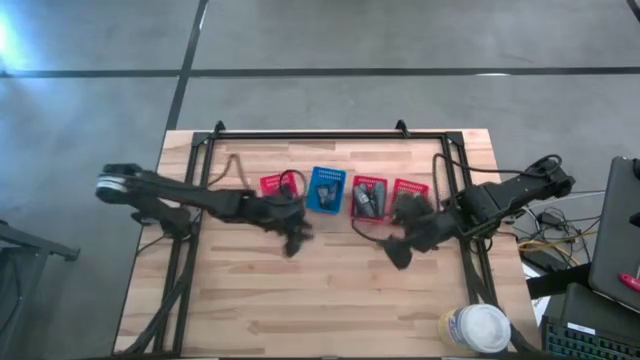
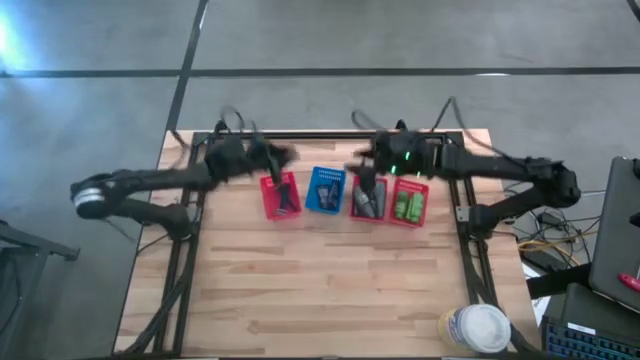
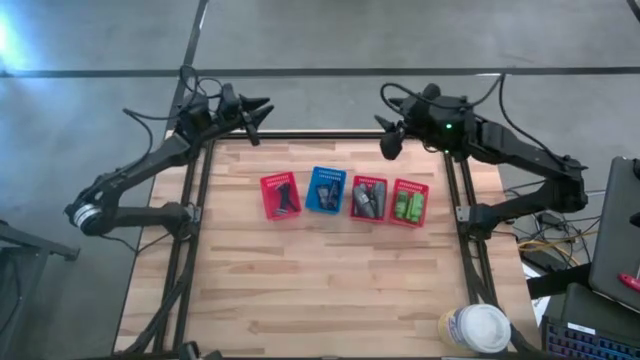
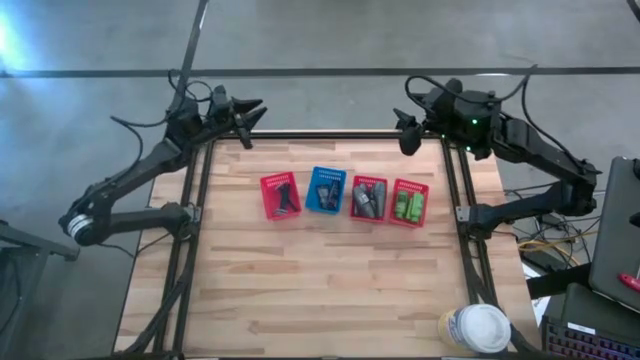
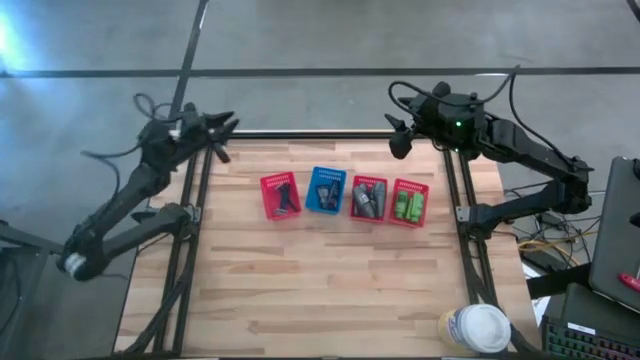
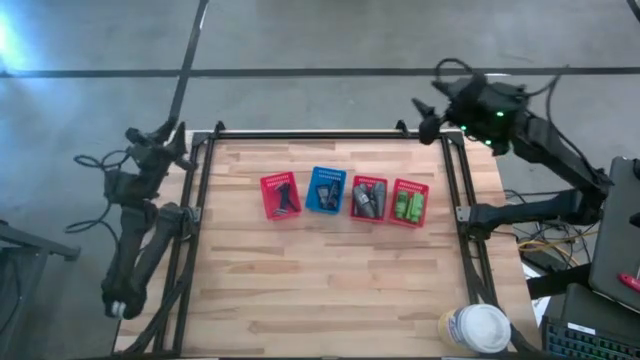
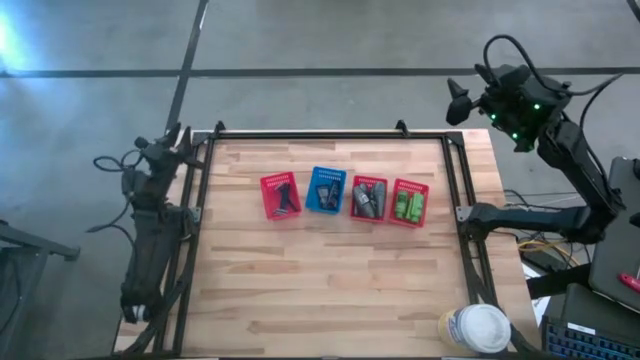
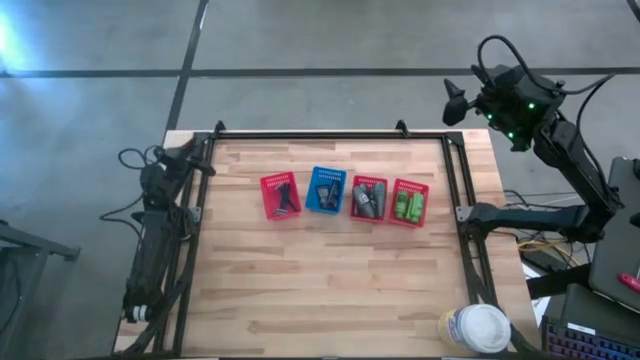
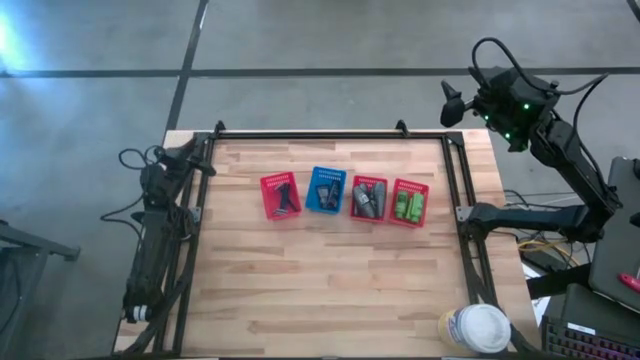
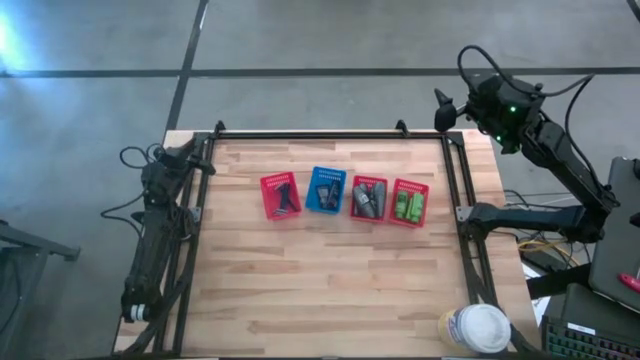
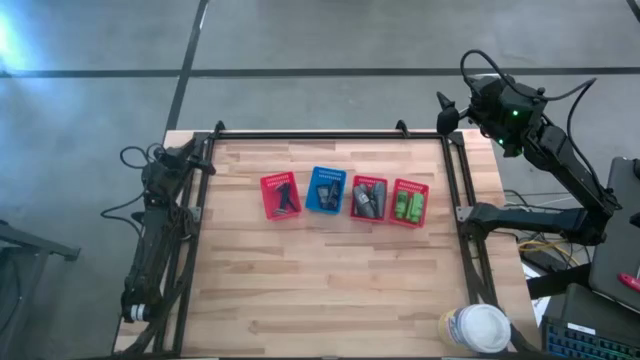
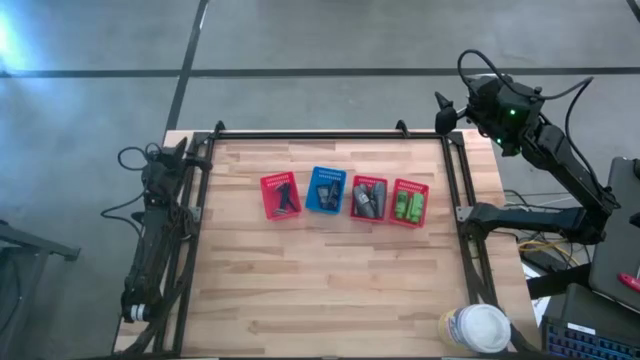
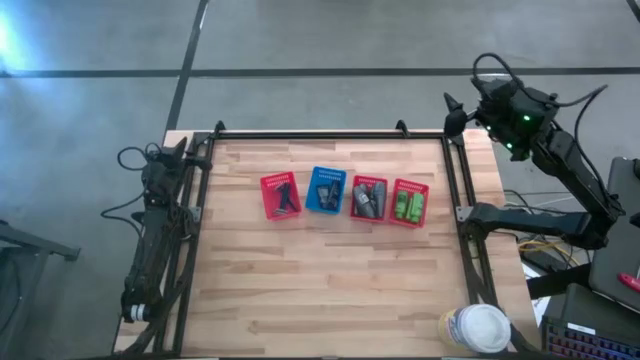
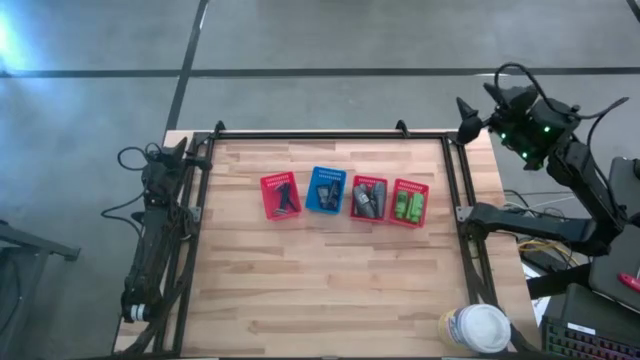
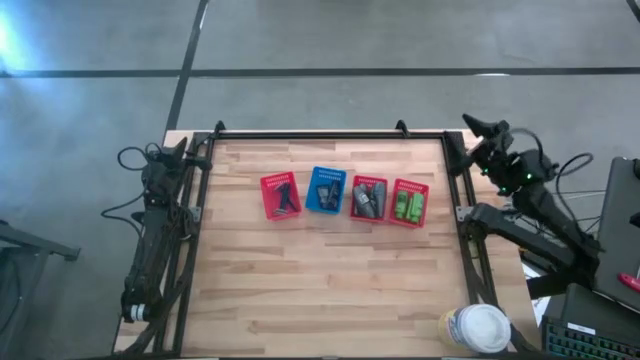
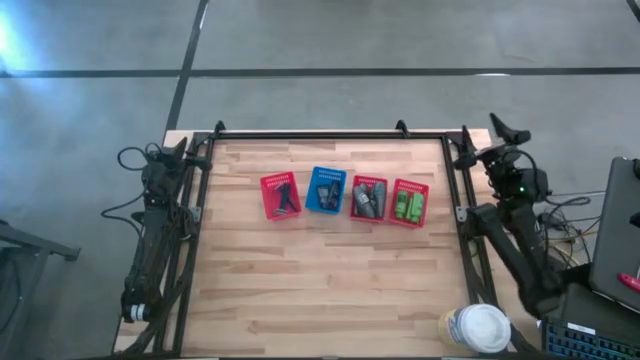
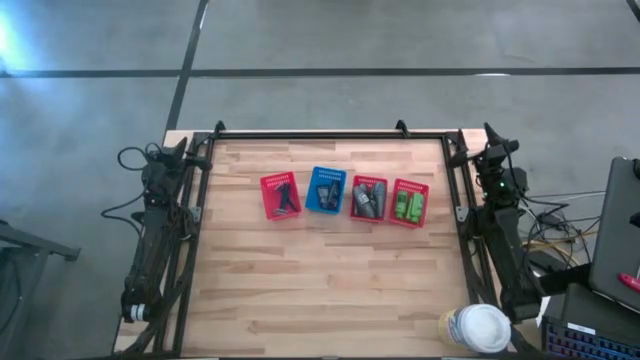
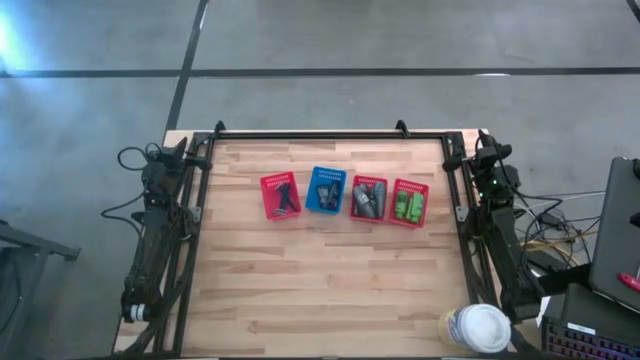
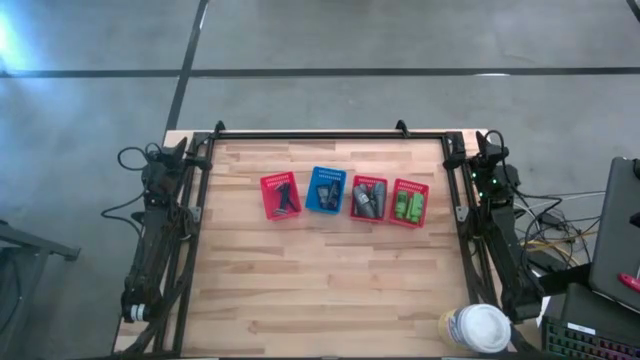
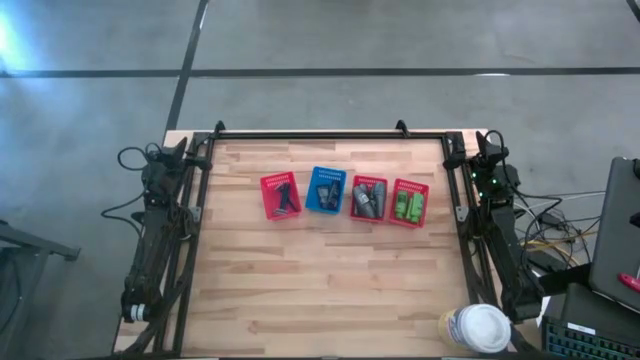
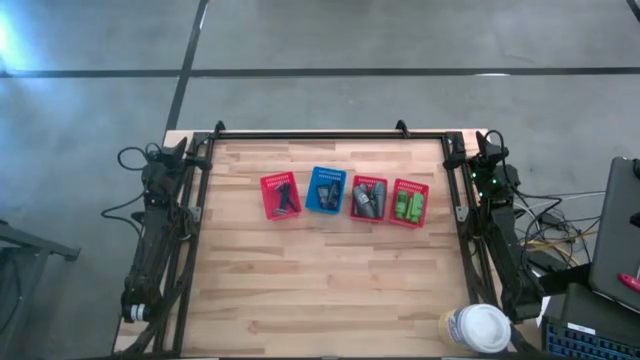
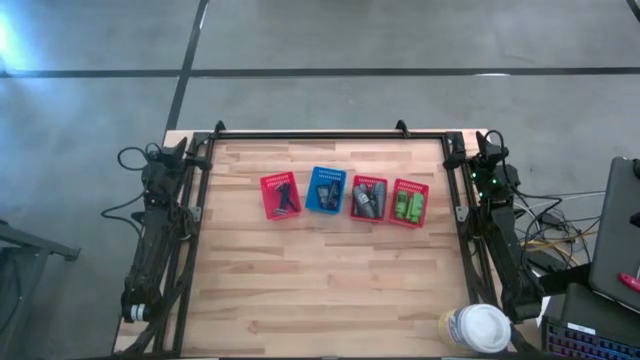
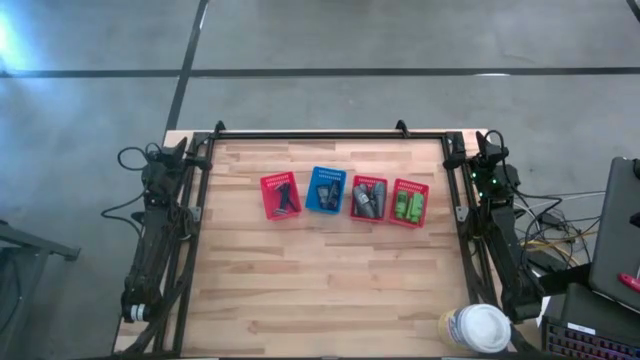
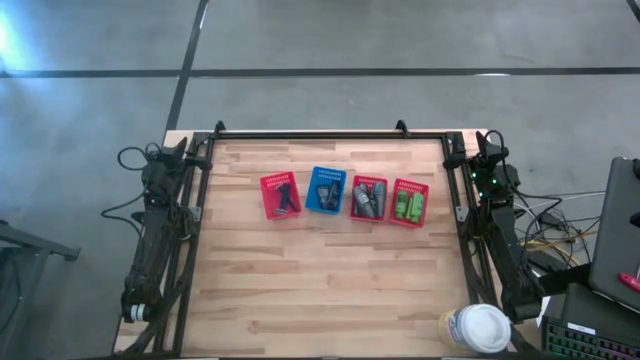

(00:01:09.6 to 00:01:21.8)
Task: Pick & Place Travel size toiletries
Return to Home Position

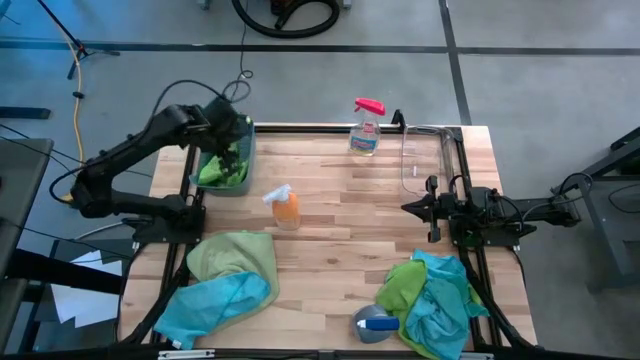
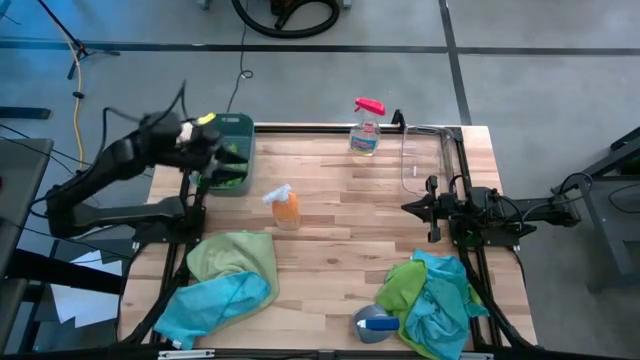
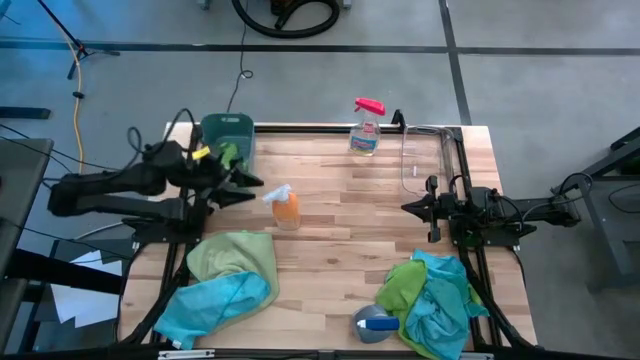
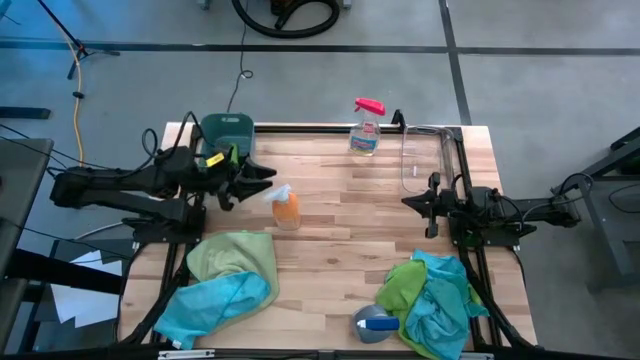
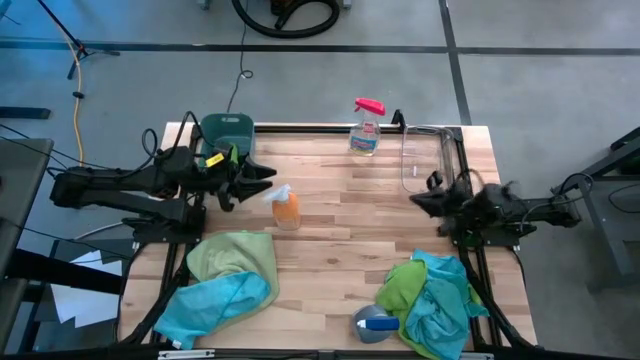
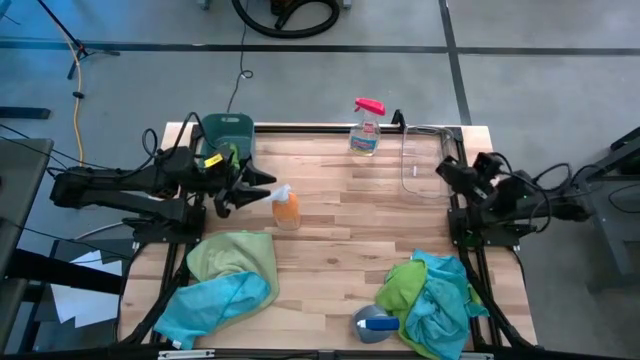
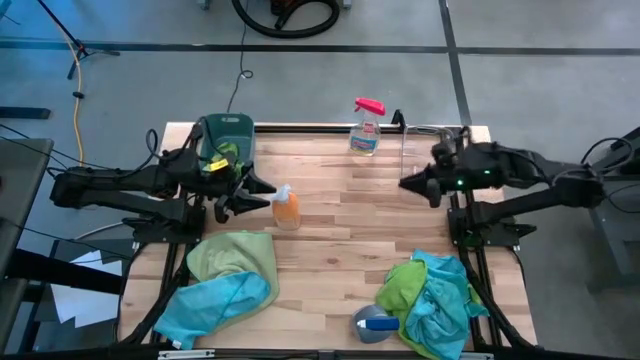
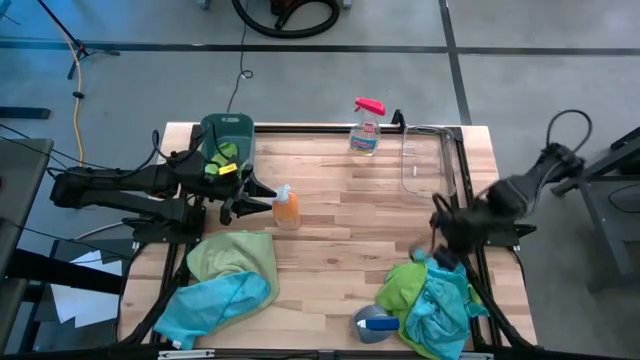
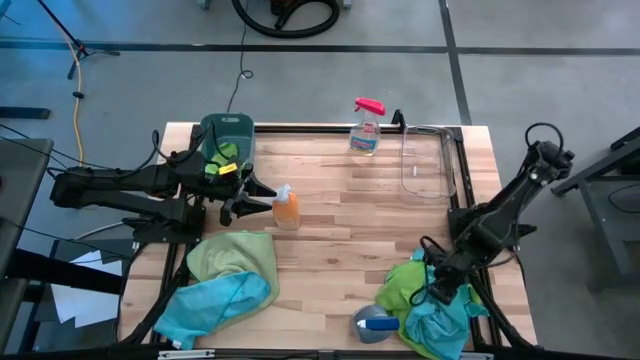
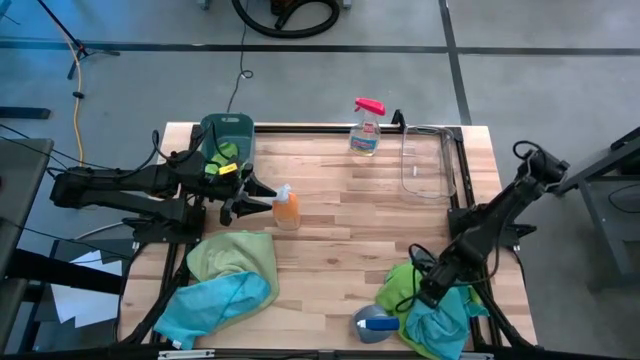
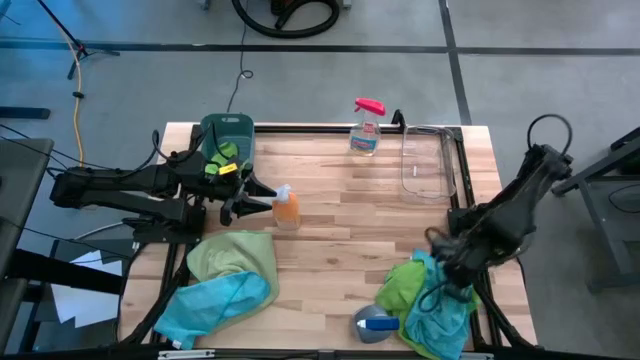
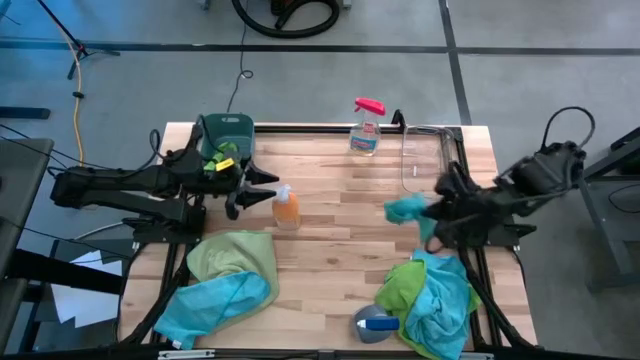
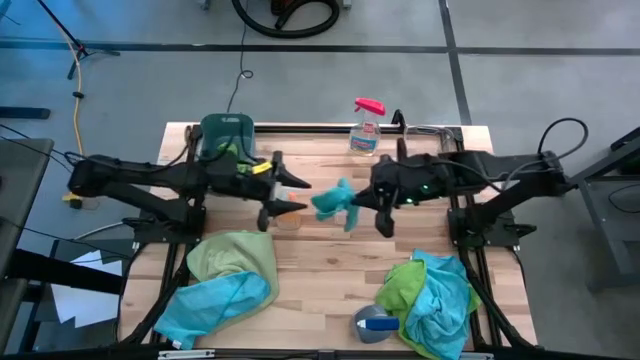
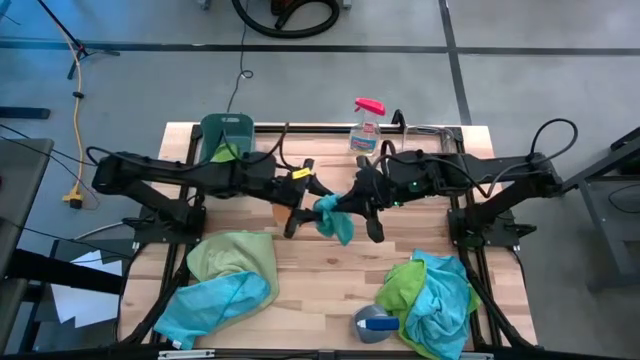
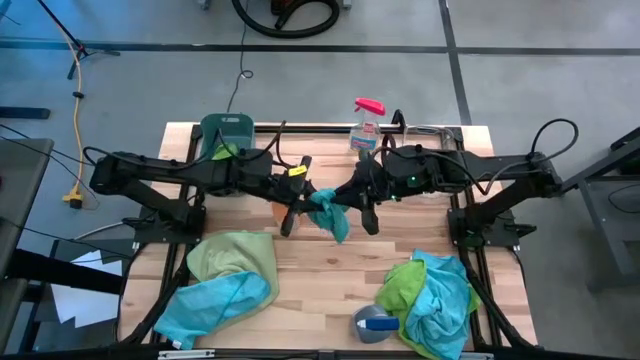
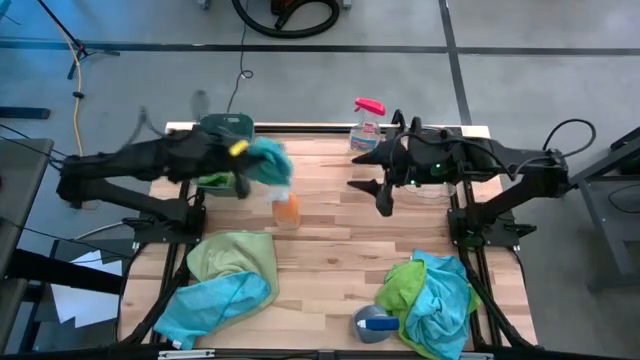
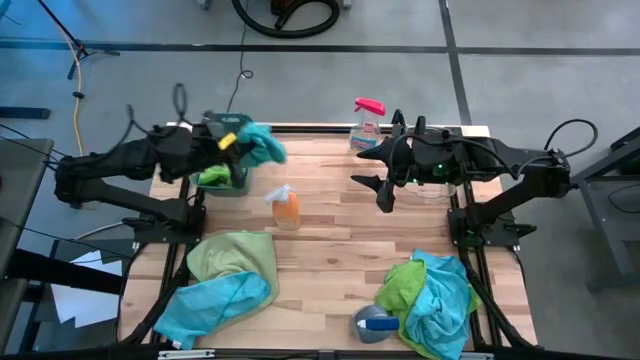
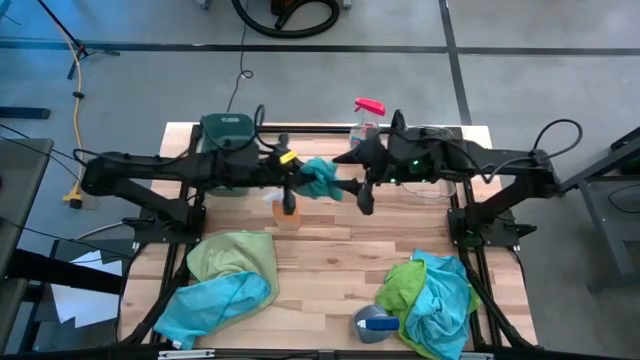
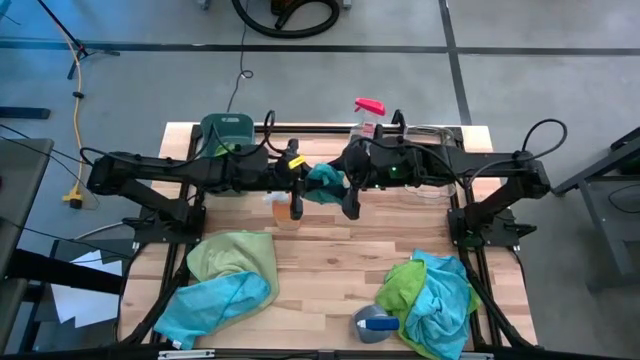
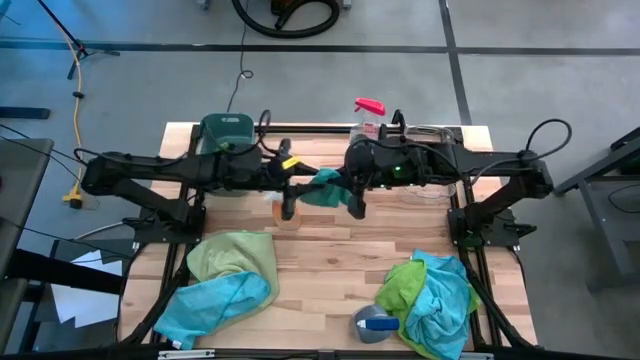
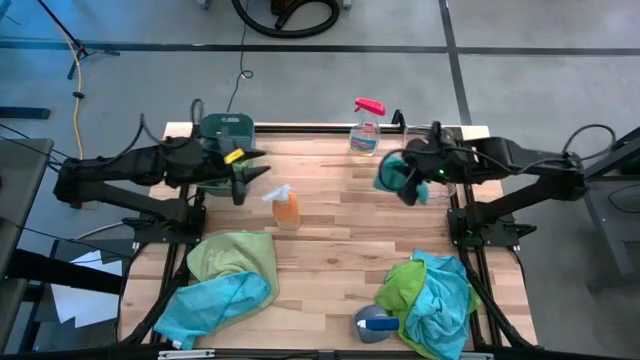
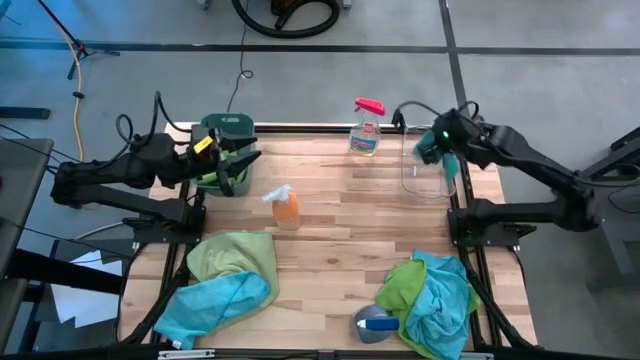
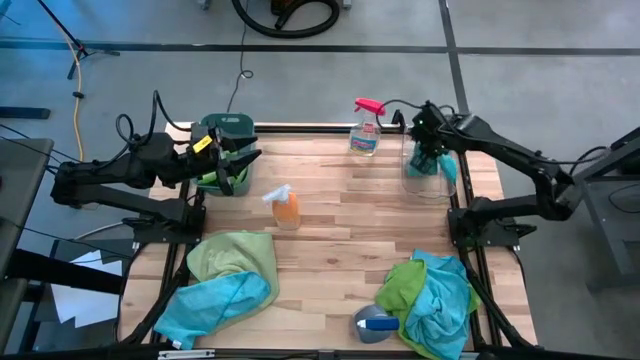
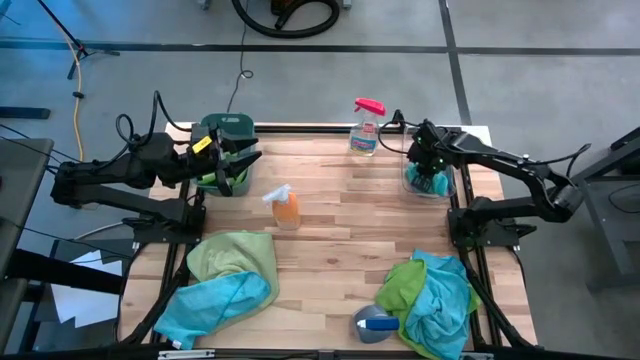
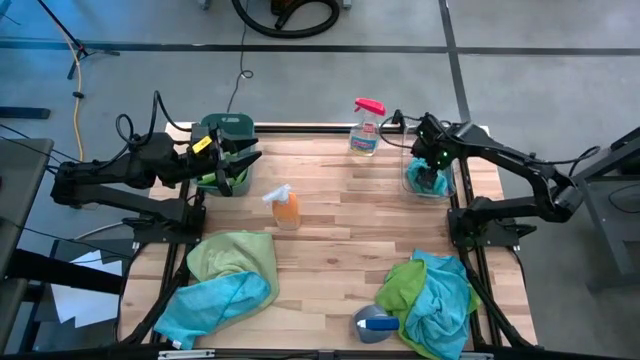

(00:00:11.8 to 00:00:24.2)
Task: Sort microfiber towel by color & place in baskets
Put the blue microfiber towel into the transparent bin
